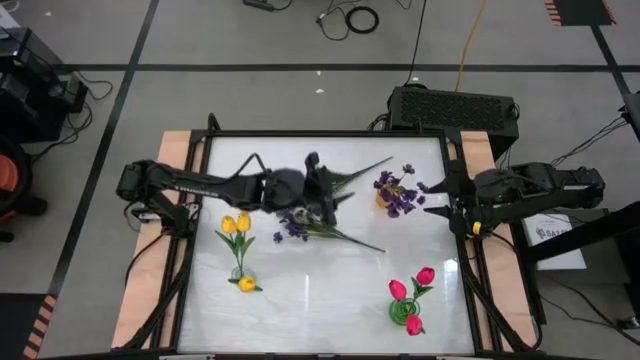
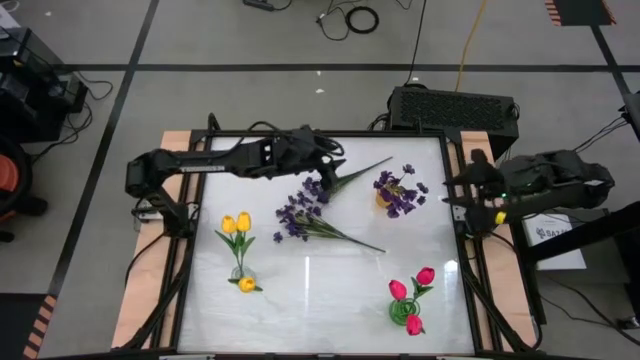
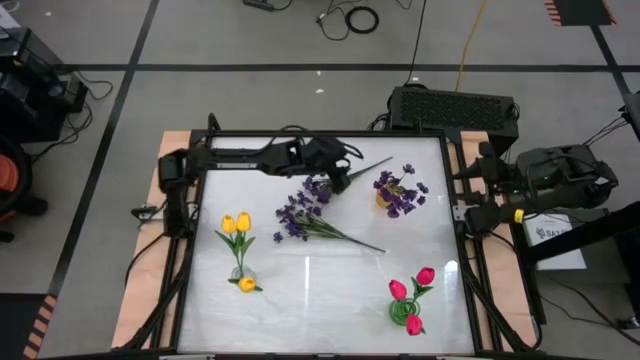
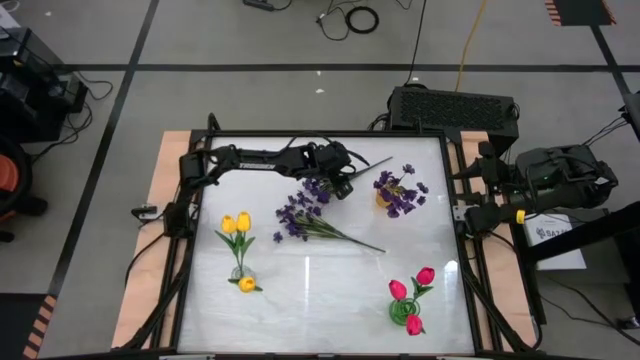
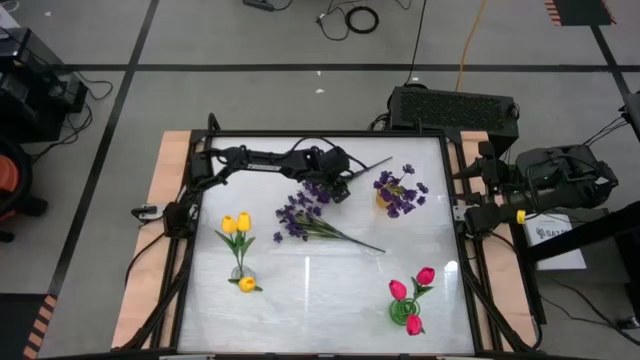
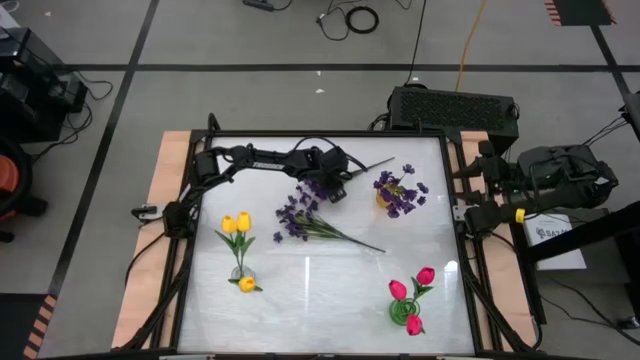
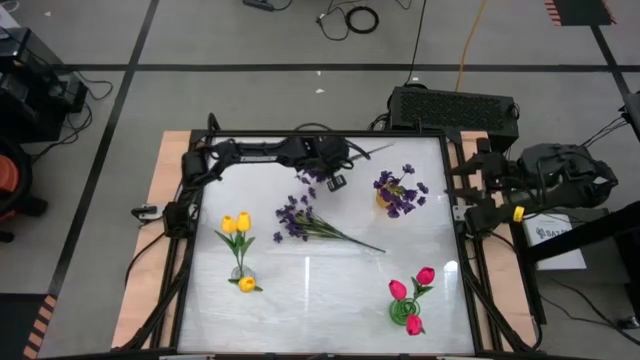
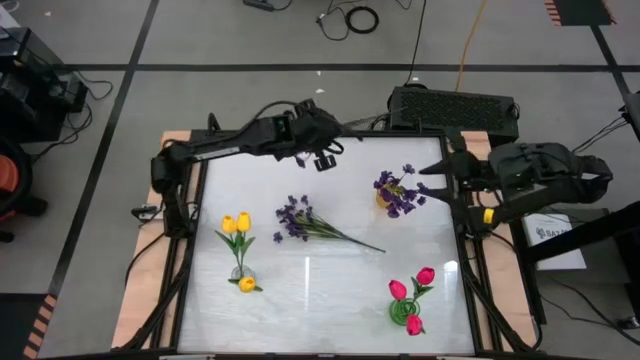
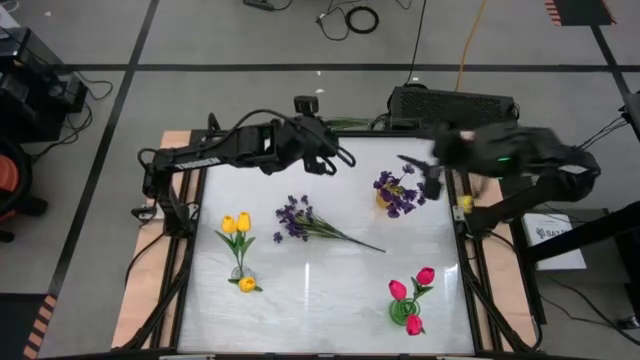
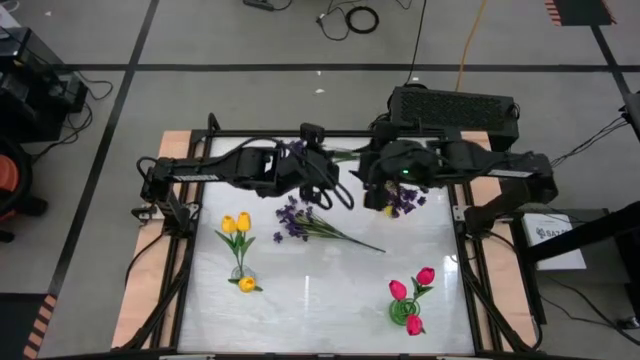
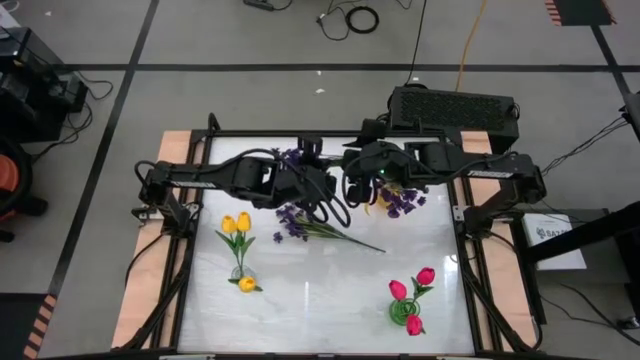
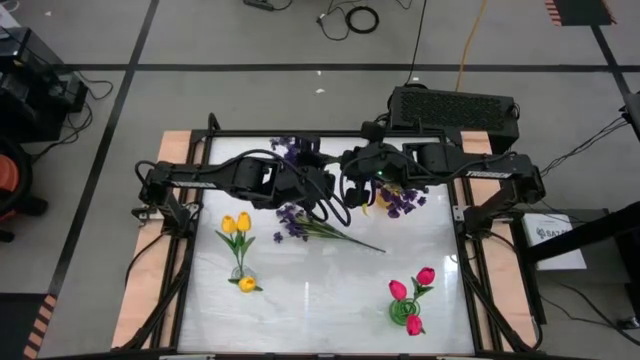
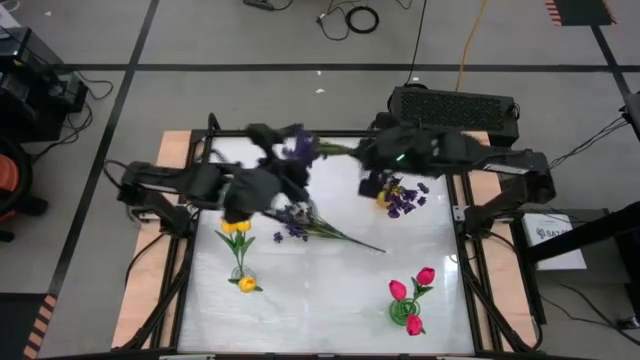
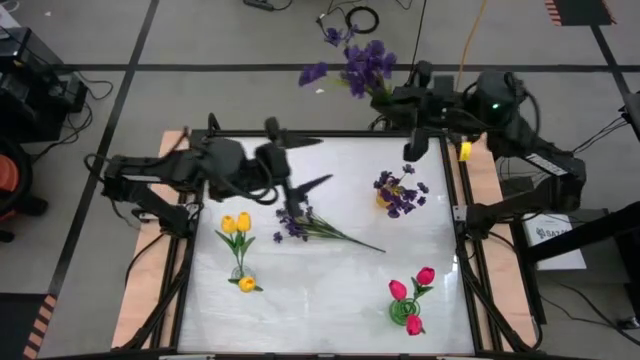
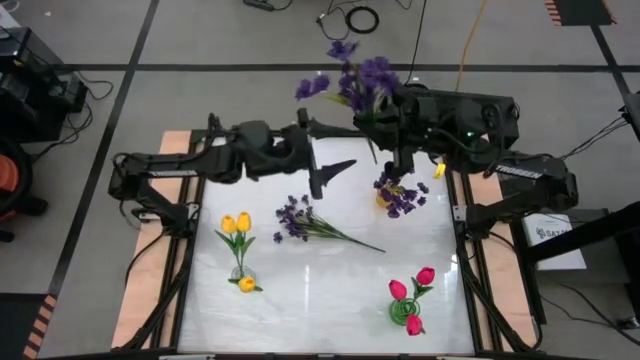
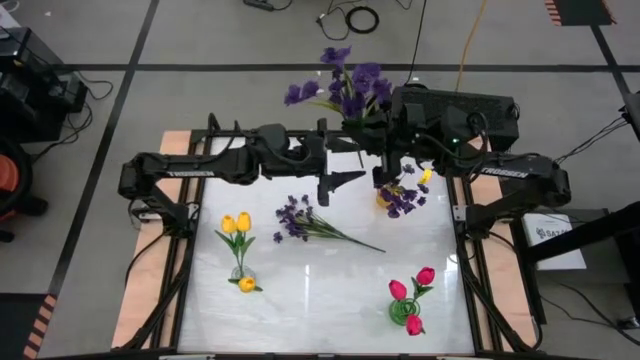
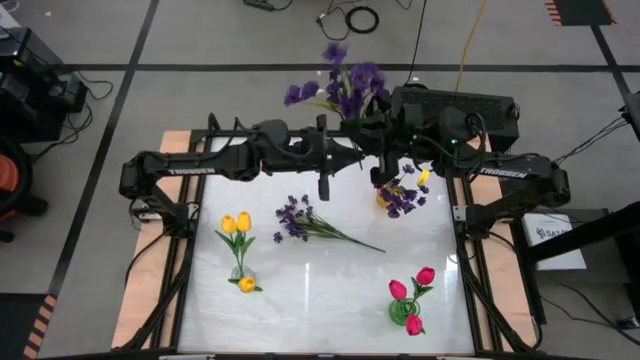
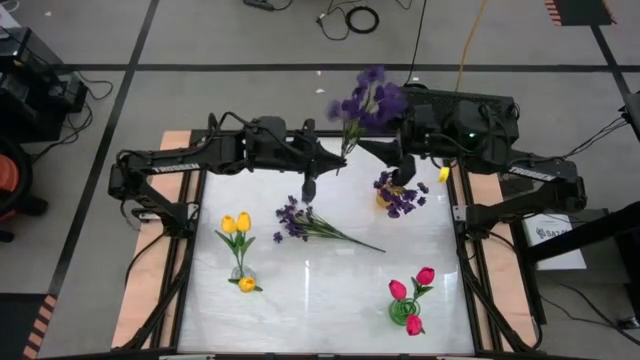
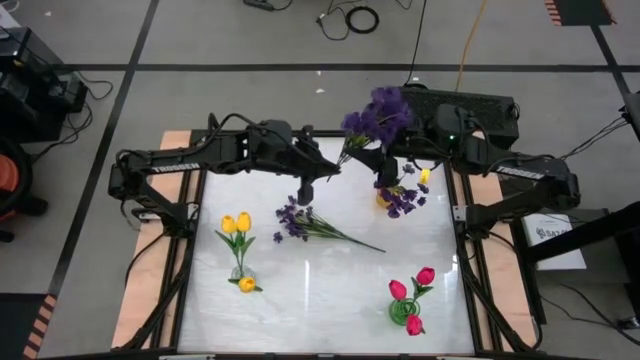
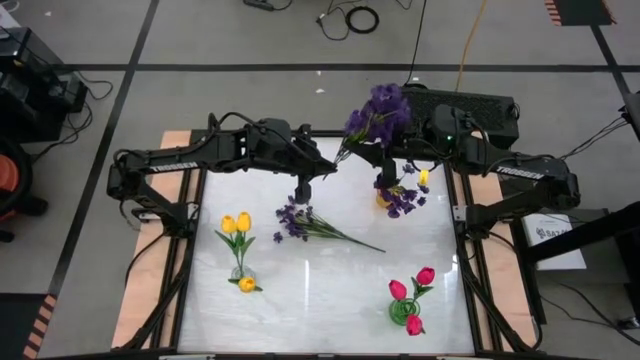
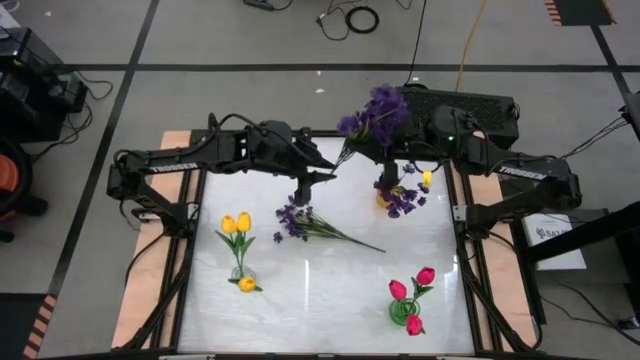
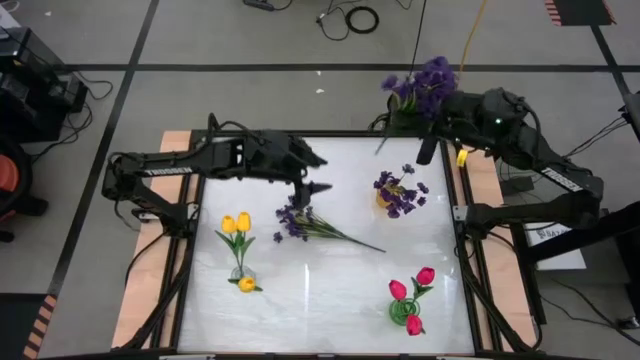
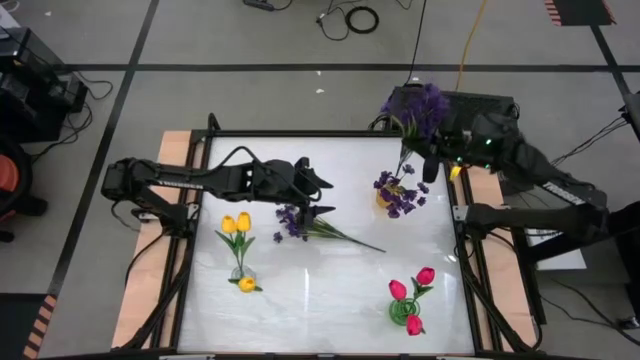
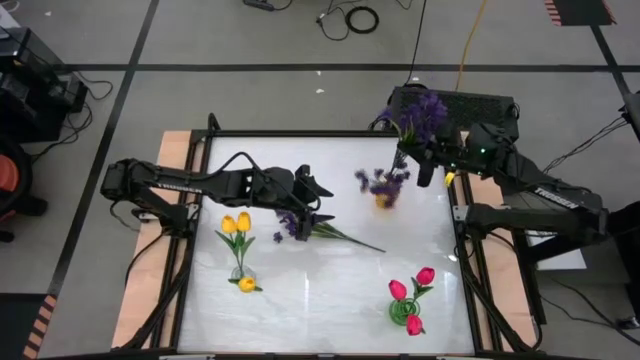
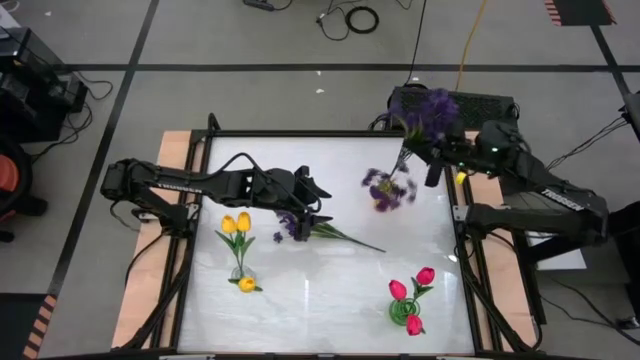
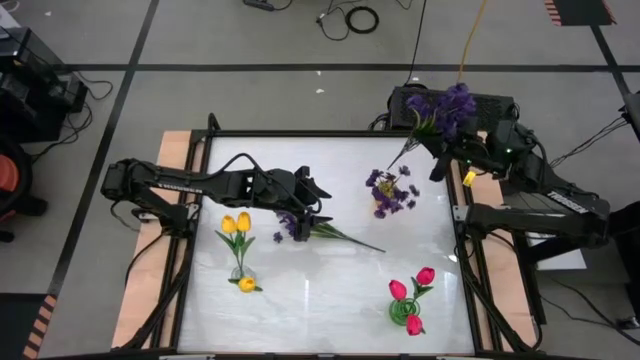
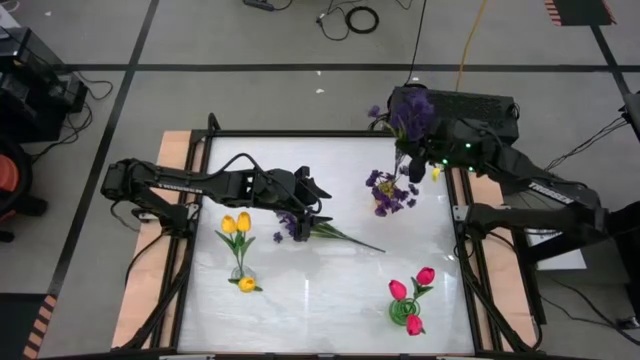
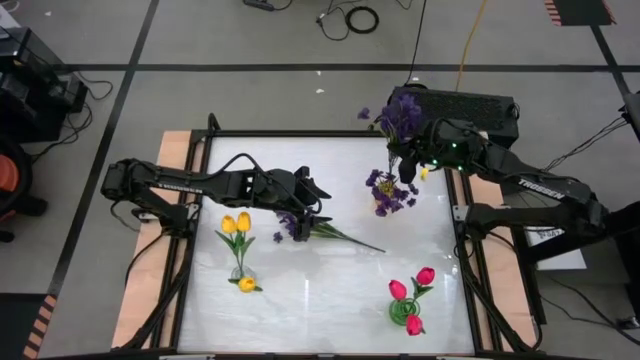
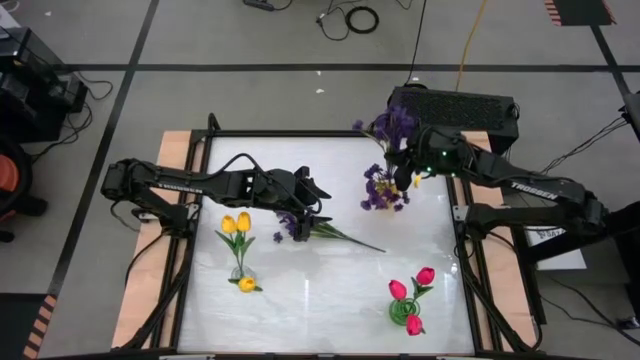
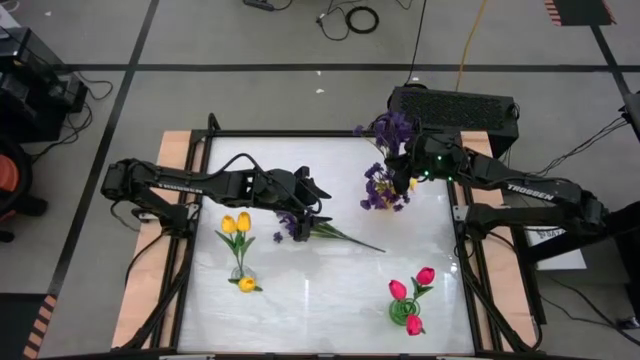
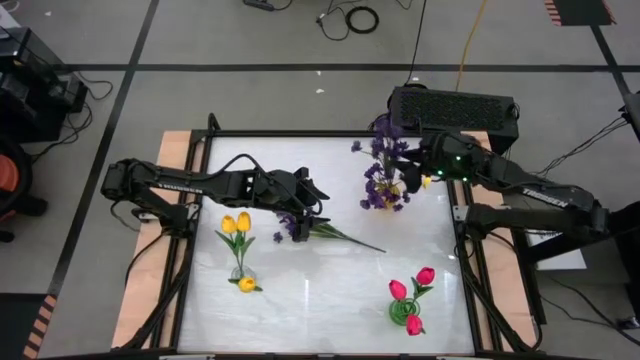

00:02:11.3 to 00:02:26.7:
Task: Sort flowers into vase by color
Put the top purple flowers into the yellow vase

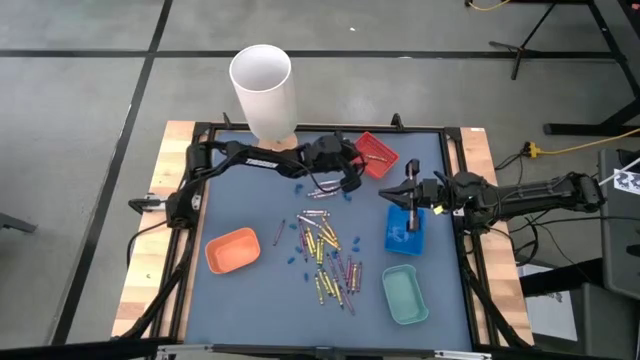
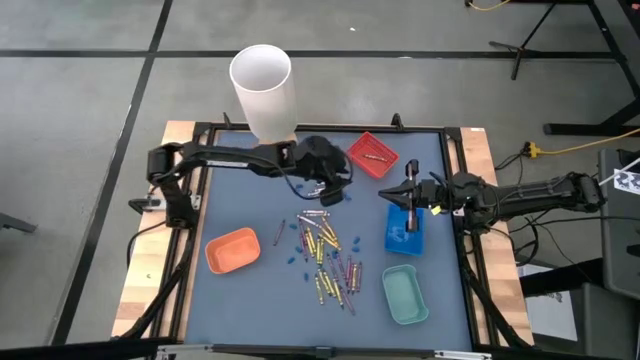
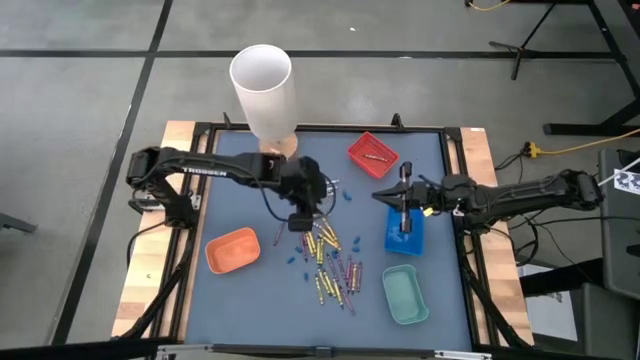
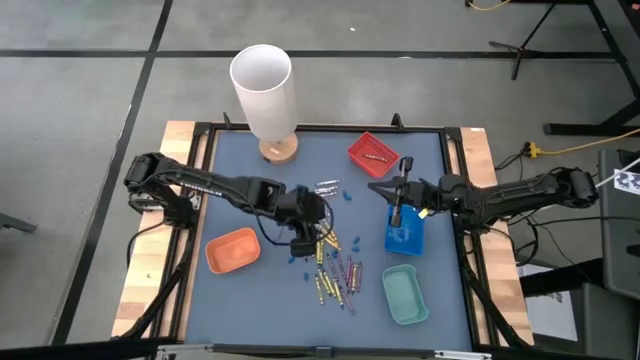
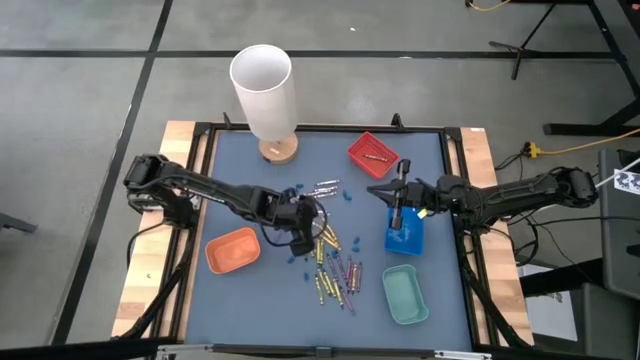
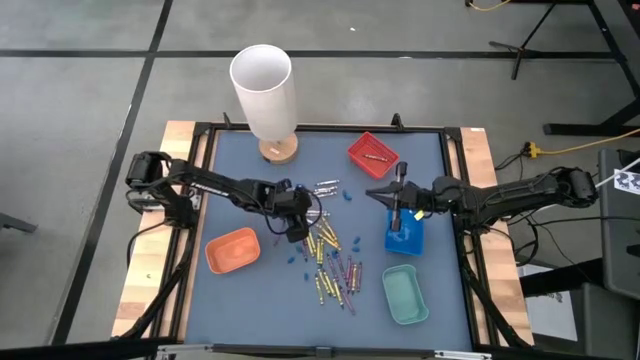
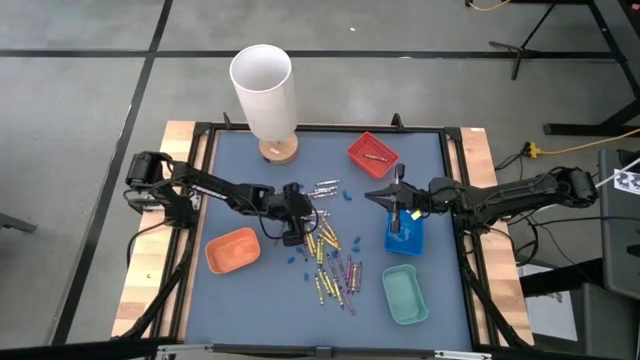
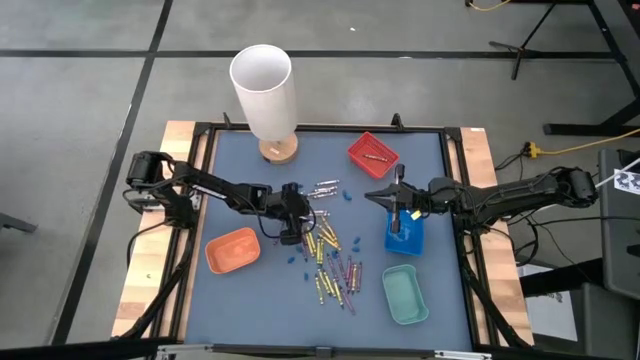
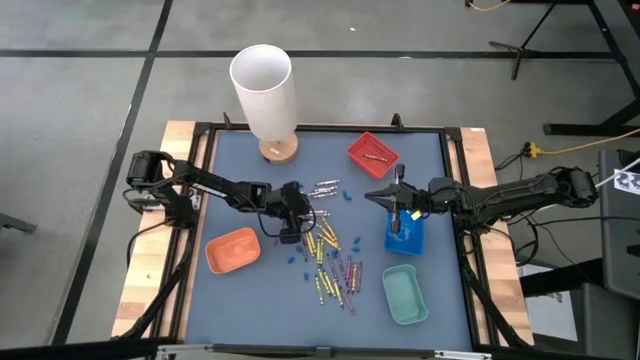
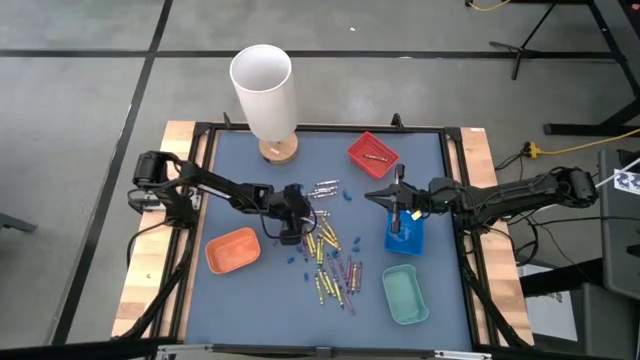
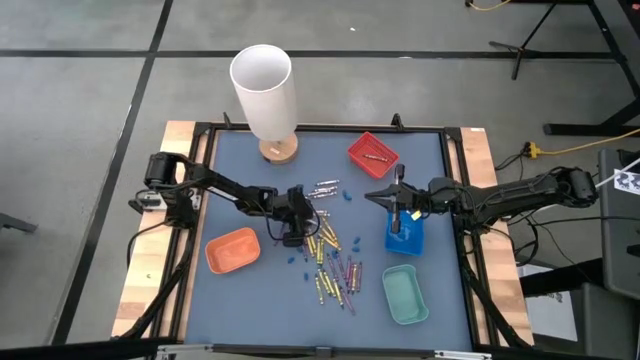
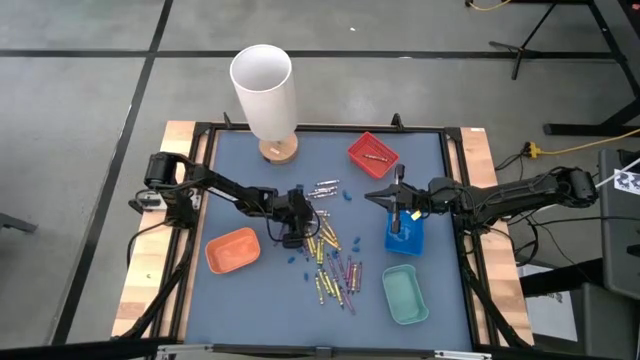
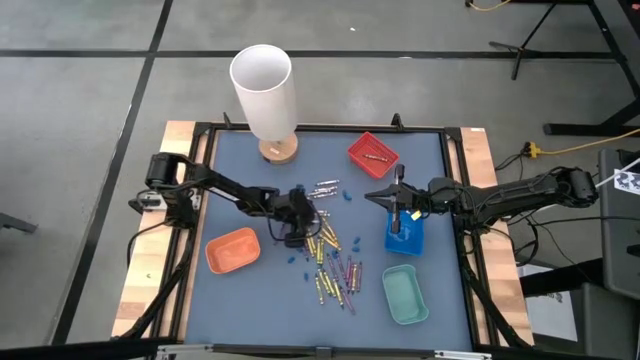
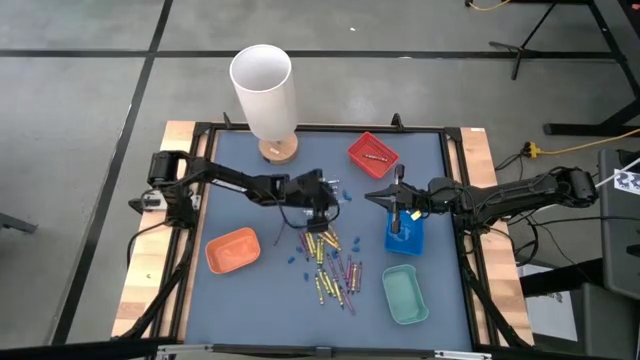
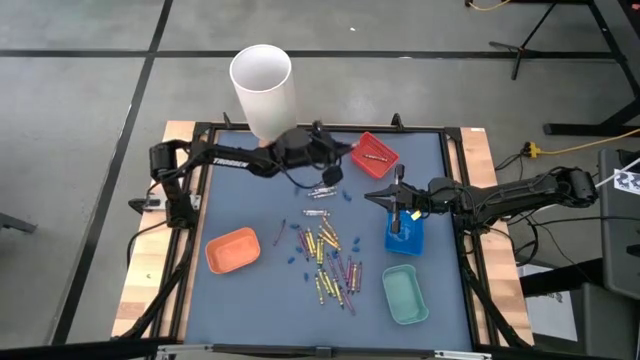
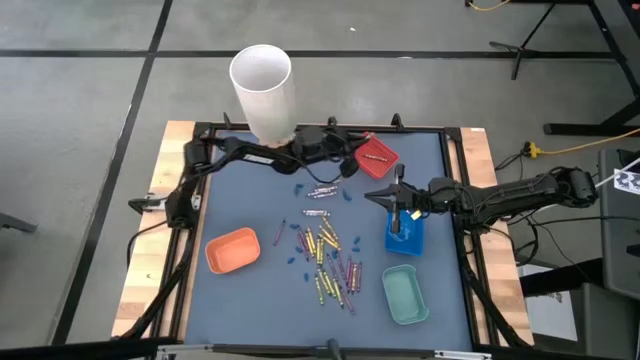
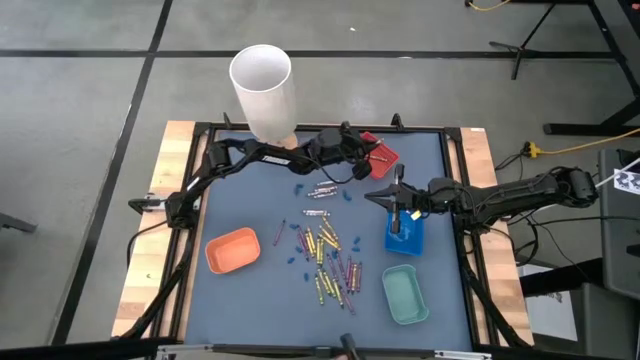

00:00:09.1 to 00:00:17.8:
Task: Sort crayons
Put the grey crayon into the red bin
